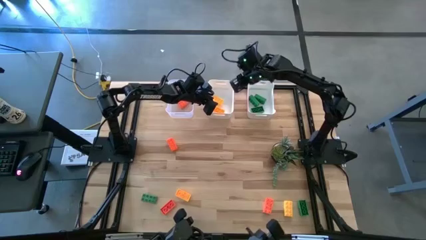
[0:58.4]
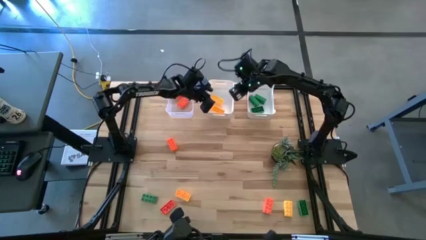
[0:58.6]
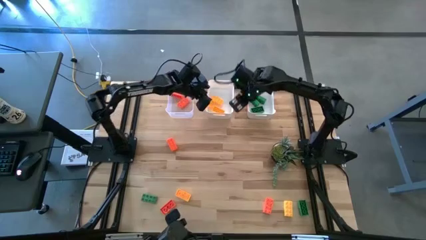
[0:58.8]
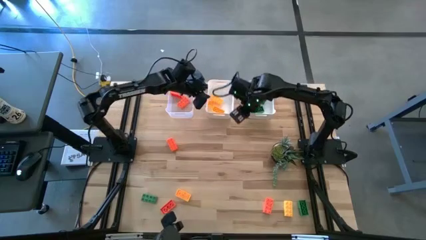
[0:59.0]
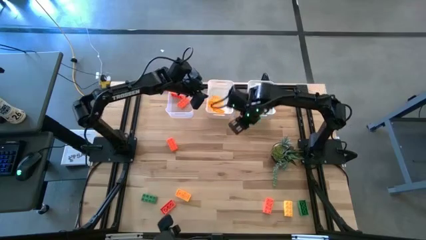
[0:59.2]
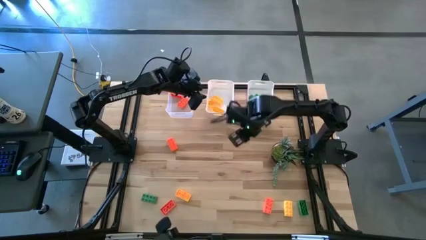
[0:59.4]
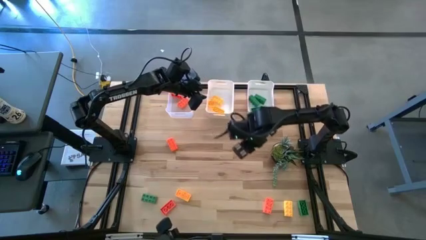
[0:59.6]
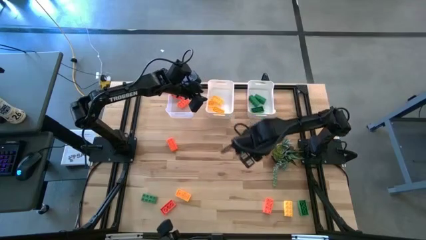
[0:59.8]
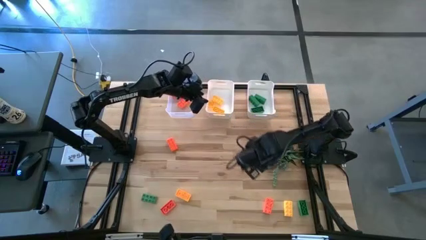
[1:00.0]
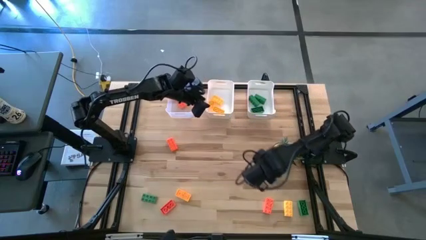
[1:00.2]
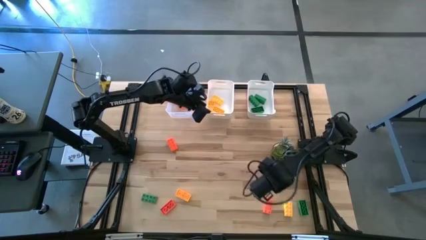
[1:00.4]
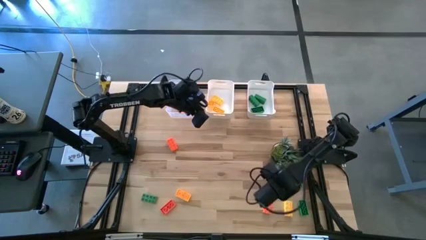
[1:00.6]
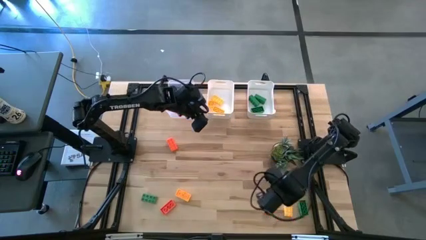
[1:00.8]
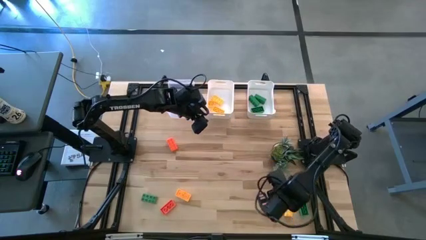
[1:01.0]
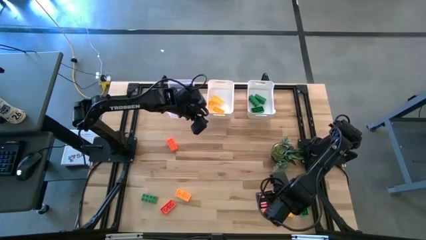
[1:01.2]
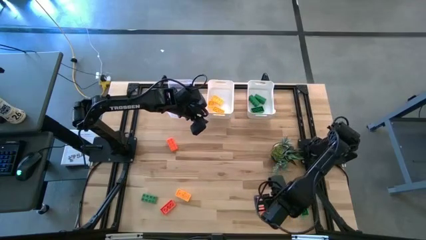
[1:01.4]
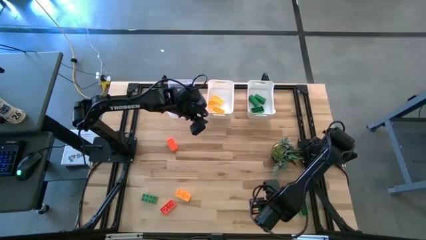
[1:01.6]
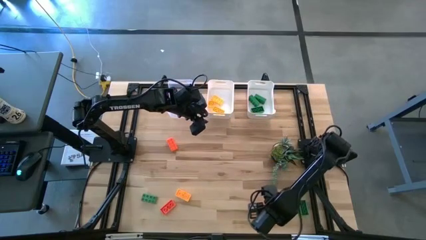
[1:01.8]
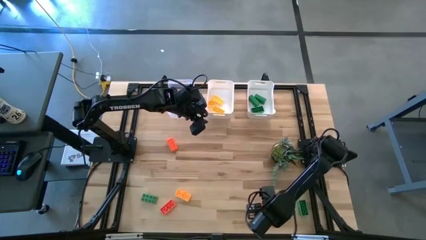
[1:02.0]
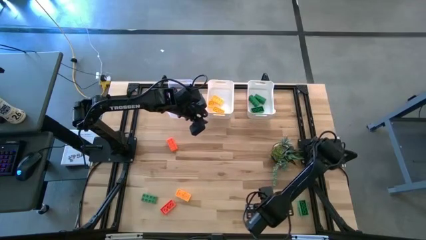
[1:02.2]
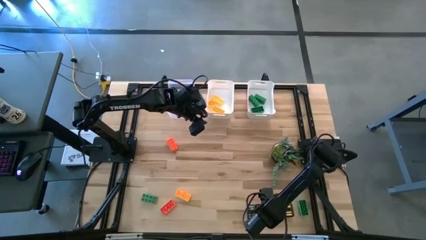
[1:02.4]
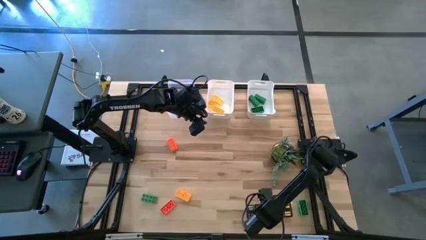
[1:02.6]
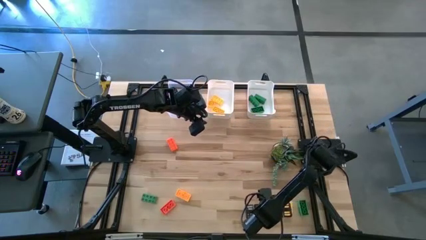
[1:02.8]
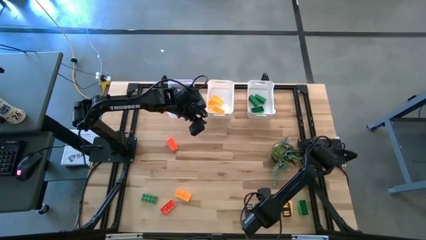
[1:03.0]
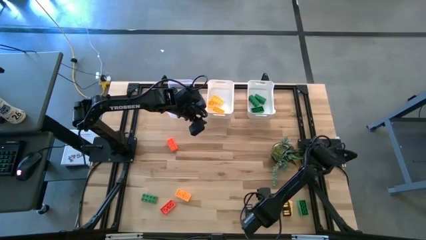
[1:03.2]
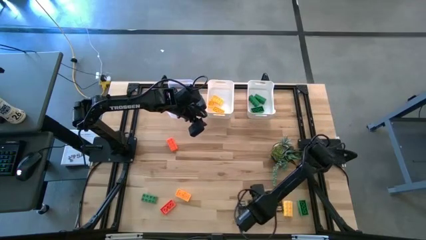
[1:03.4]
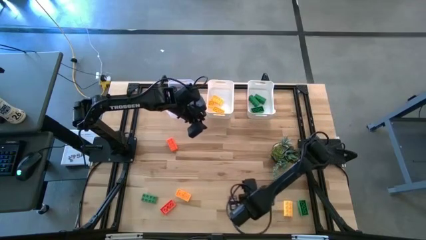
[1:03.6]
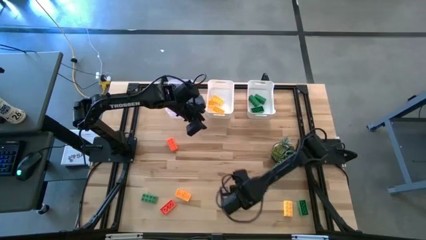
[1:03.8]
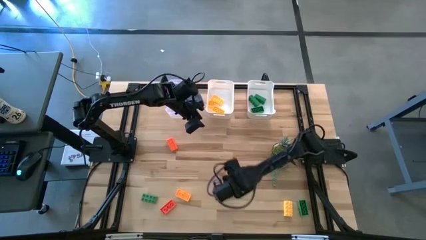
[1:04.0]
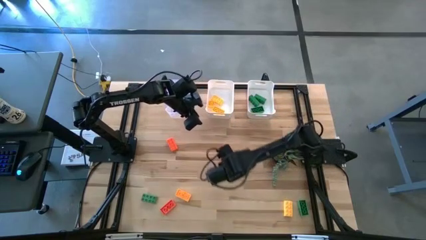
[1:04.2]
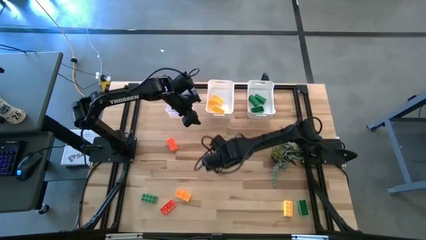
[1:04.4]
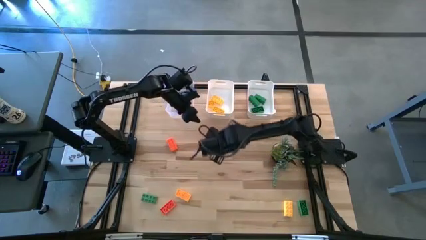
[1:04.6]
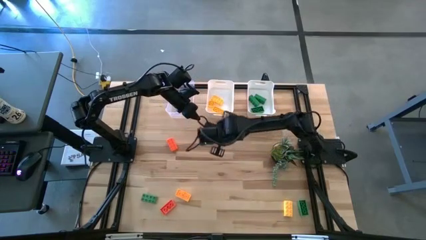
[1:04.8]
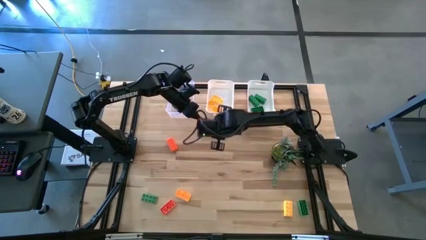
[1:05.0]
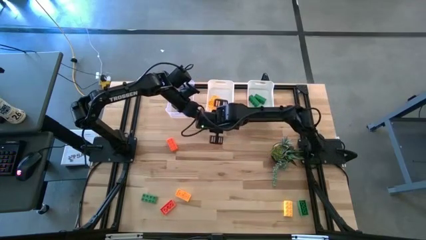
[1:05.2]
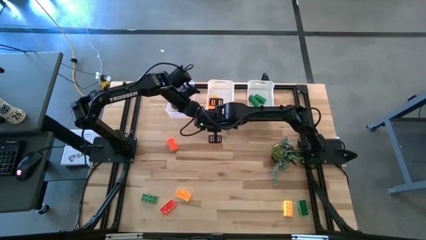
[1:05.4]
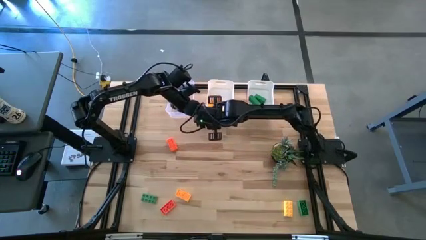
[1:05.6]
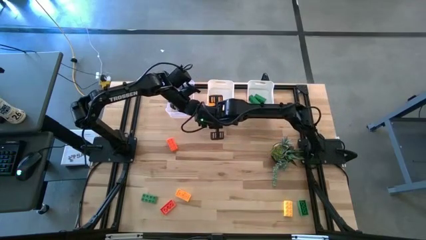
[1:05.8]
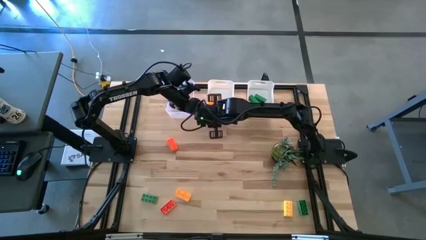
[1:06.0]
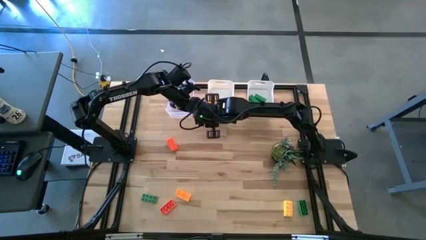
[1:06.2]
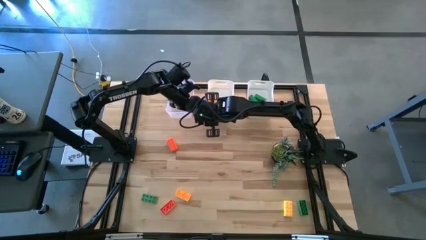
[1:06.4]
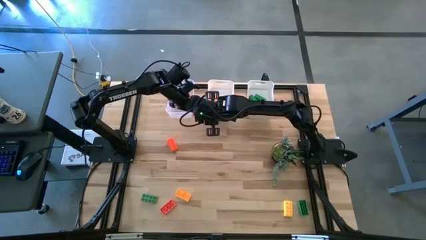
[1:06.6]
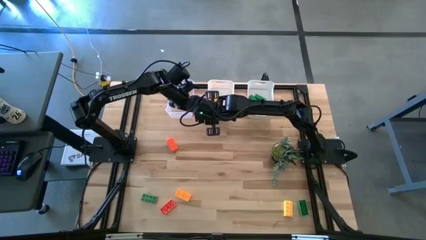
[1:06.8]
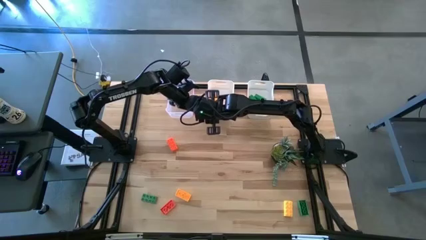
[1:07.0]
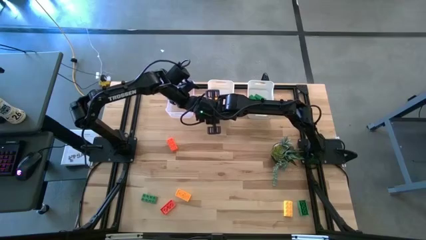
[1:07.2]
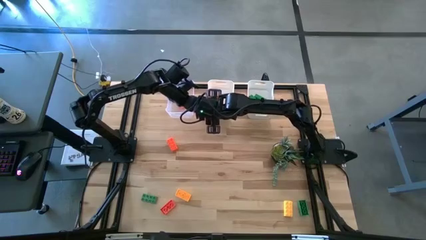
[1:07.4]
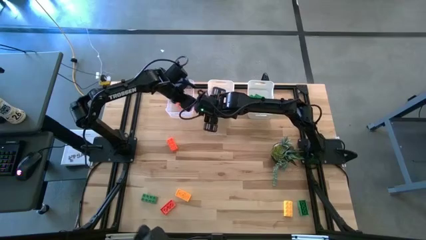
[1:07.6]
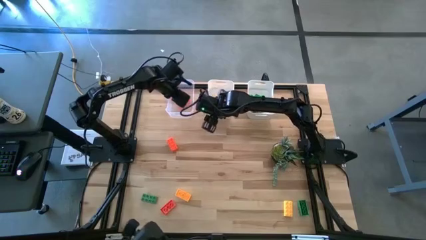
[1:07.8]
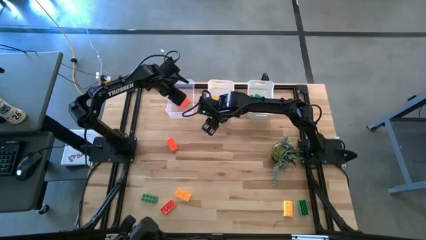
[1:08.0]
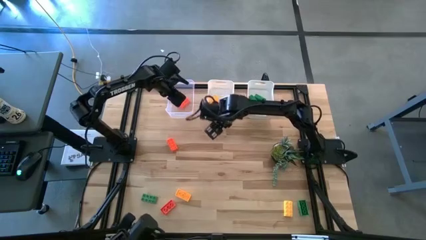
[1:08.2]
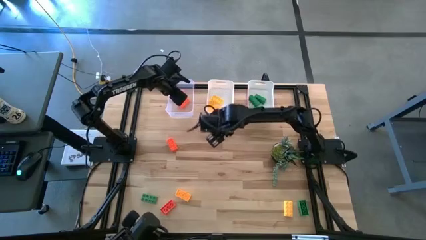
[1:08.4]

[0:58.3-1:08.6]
Task: Sort & place blocks by color
Put the orange game piece into the transparent bin

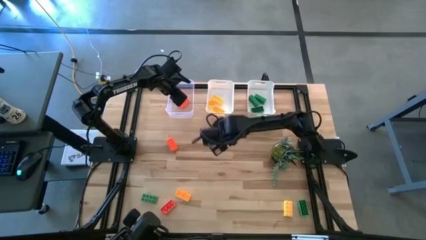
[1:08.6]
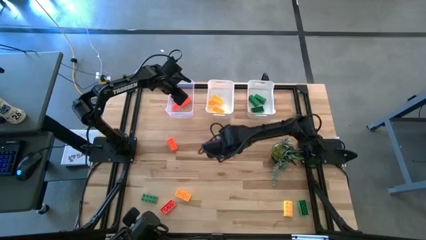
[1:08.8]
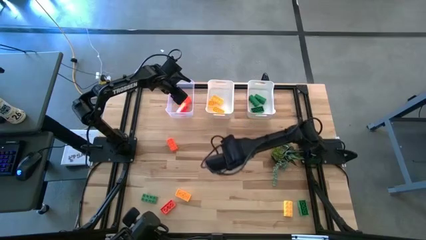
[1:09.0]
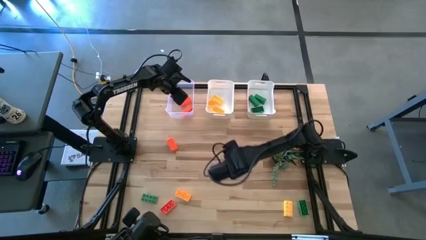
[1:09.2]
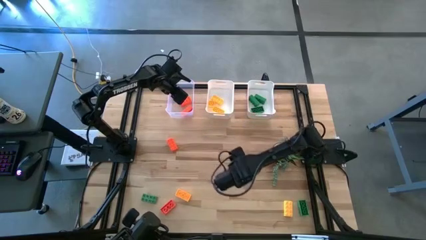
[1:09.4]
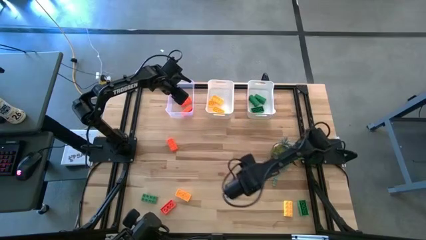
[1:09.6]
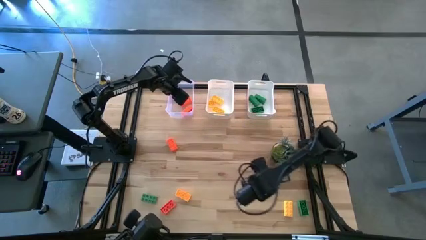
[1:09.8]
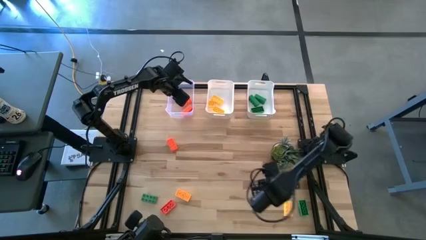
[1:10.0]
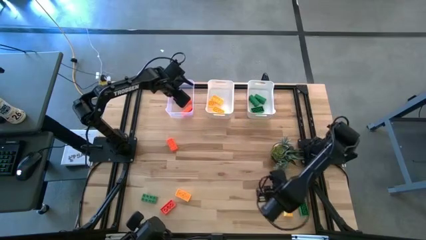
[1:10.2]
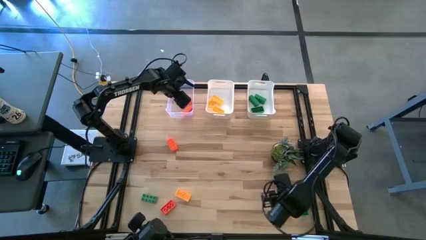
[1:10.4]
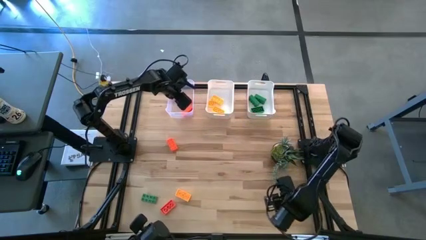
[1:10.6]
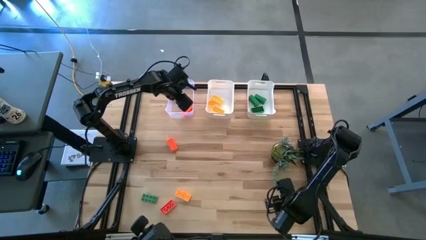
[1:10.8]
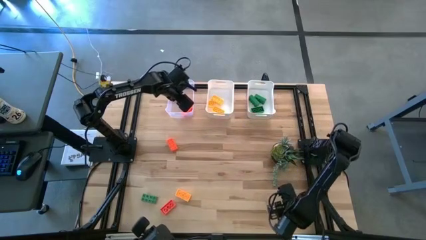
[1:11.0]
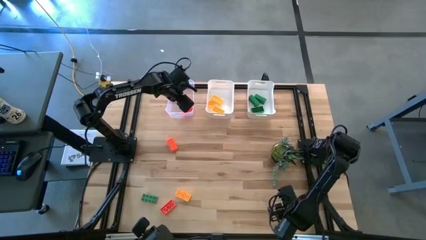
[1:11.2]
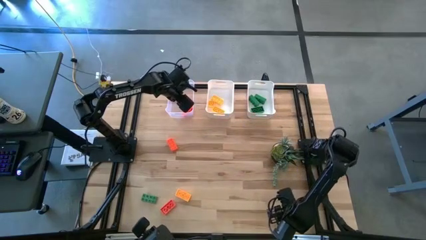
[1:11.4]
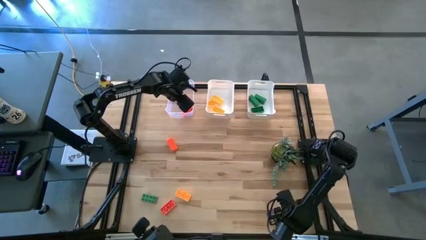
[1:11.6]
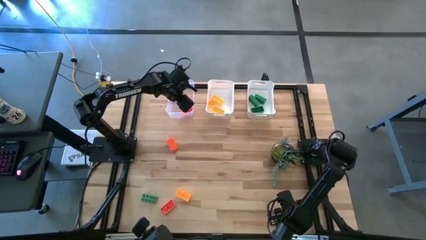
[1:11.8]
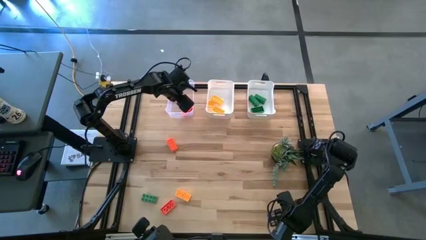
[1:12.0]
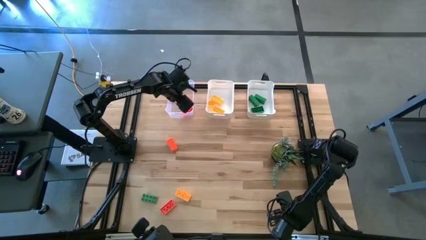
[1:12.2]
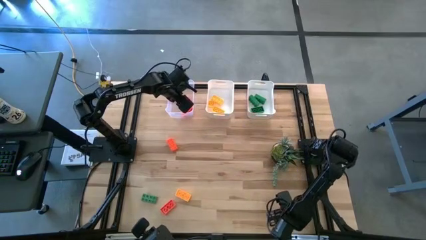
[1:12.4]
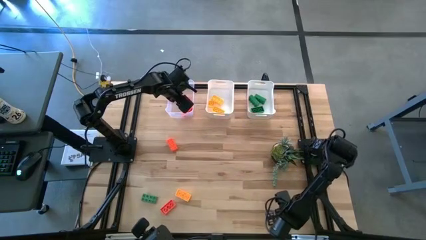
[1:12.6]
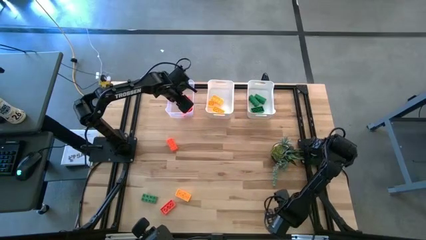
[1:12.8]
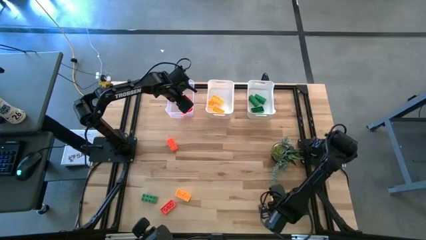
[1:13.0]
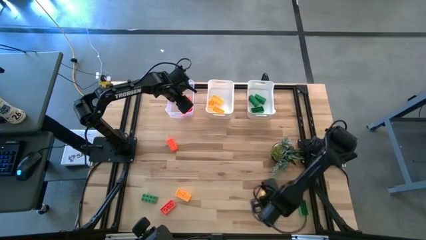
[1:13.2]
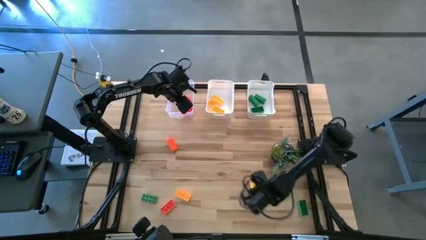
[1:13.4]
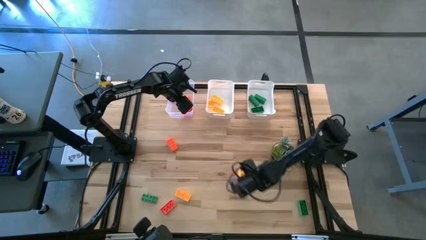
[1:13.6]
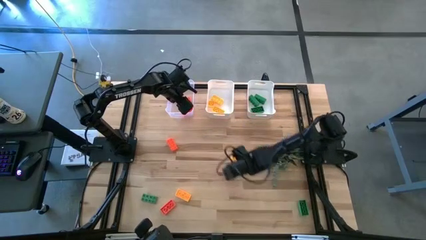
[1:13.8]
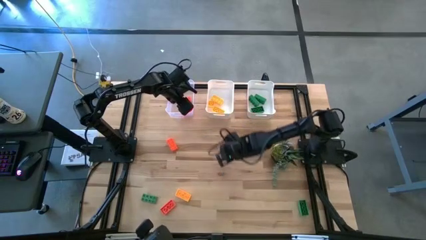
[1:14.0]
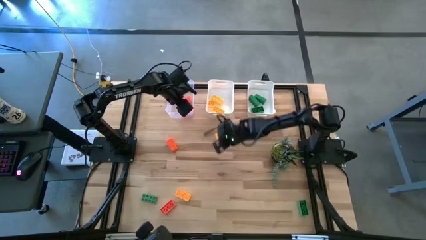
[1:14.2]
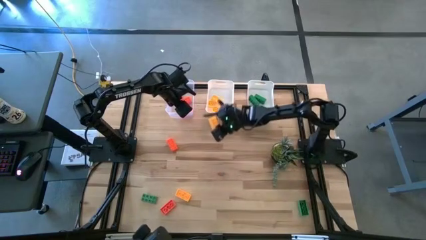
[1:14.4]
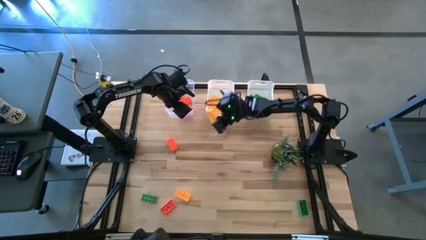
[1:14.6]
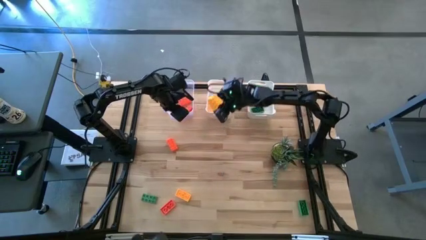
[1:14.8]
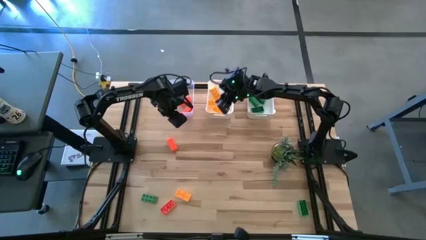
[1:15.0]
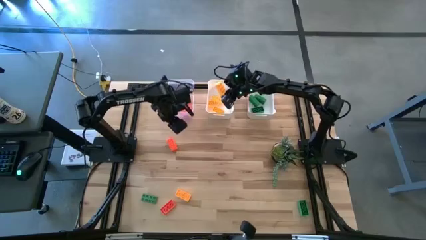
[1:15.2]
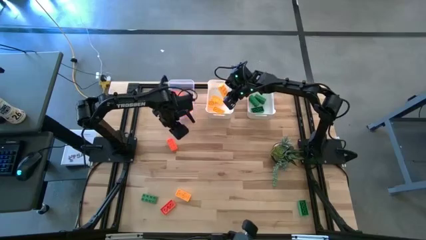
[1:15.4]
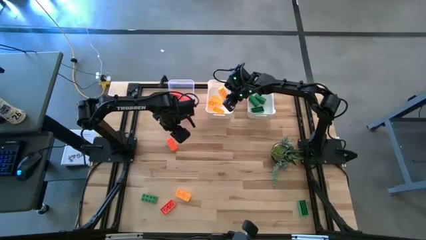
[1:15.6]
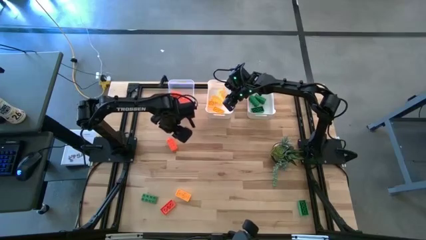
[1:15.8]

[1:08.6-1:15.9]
Put the yellow game piece into the left white bin
